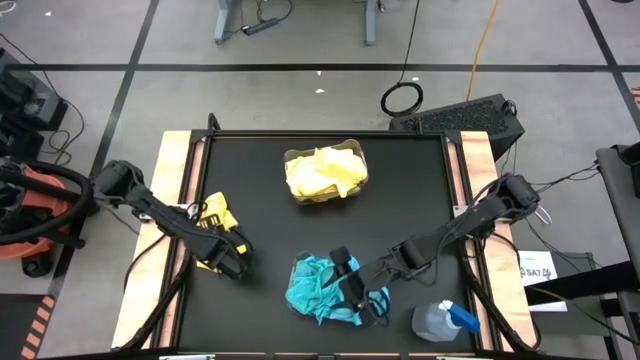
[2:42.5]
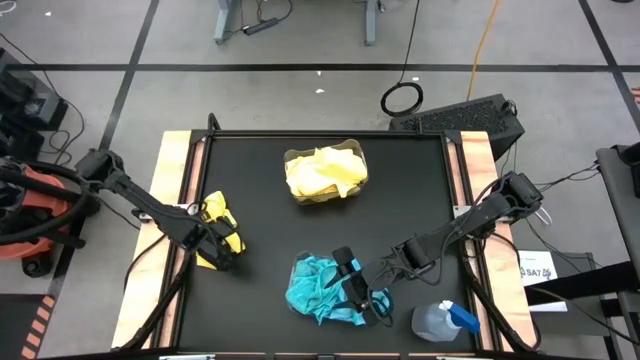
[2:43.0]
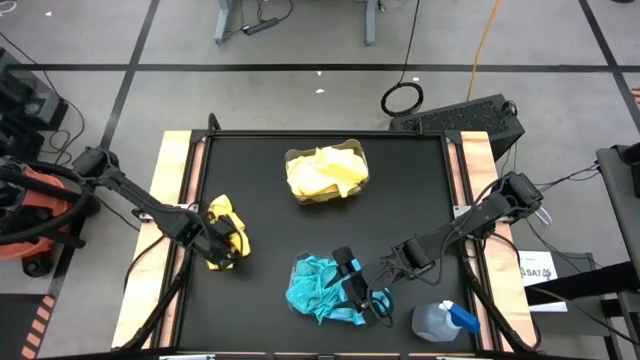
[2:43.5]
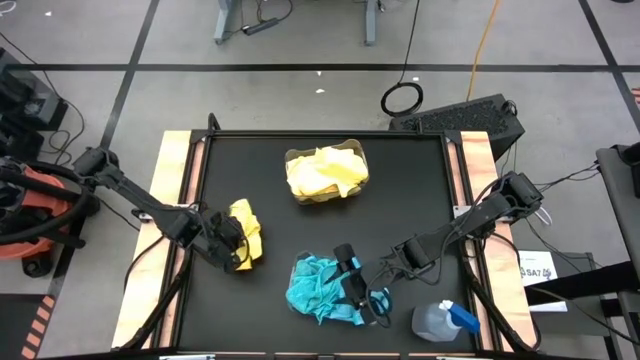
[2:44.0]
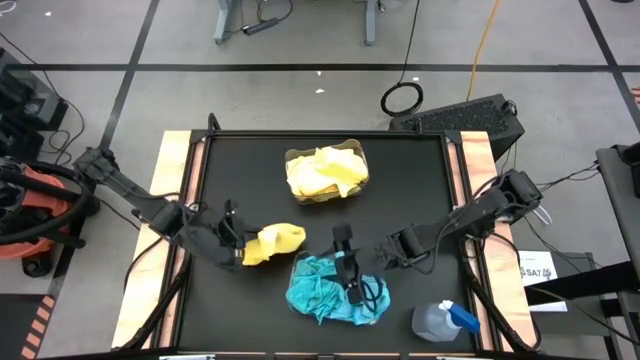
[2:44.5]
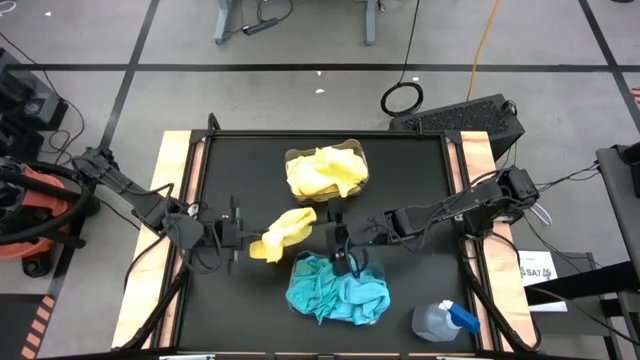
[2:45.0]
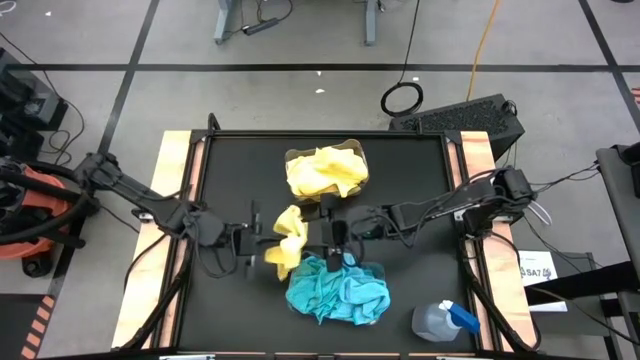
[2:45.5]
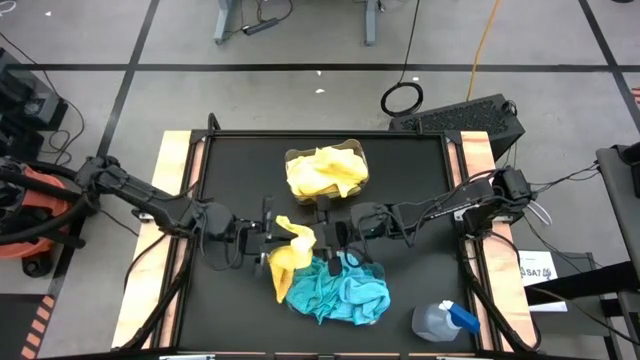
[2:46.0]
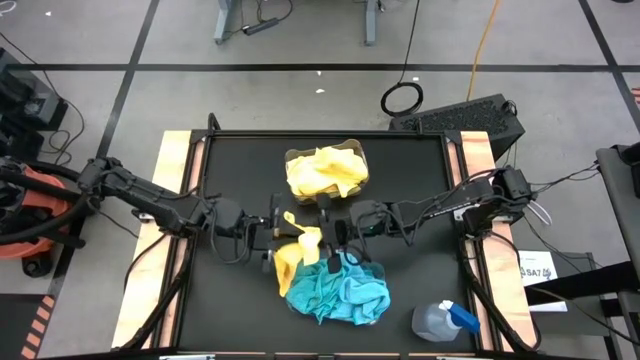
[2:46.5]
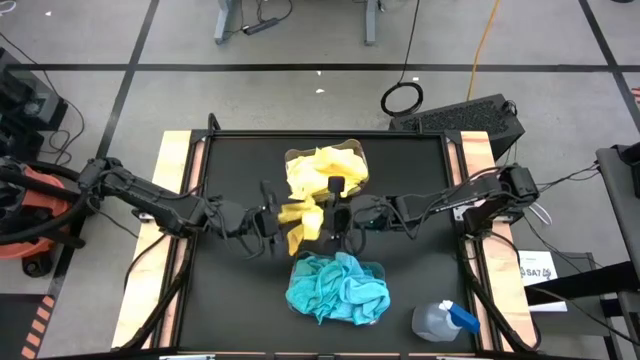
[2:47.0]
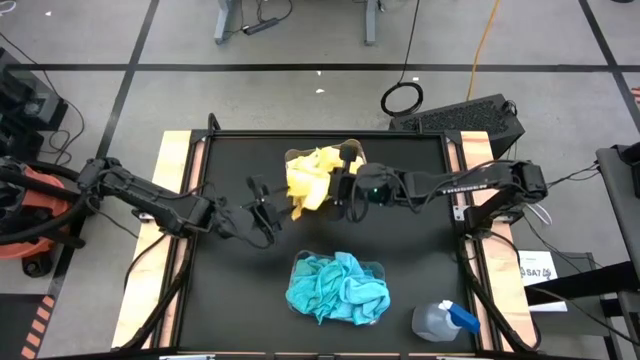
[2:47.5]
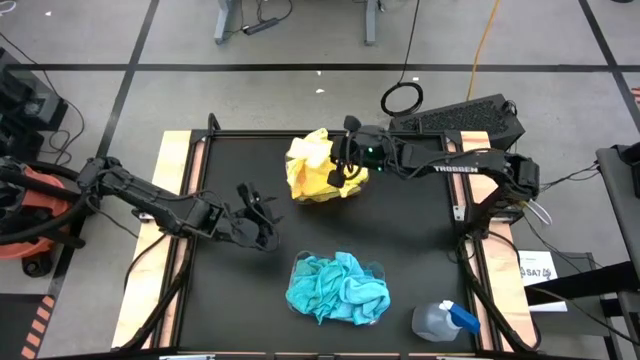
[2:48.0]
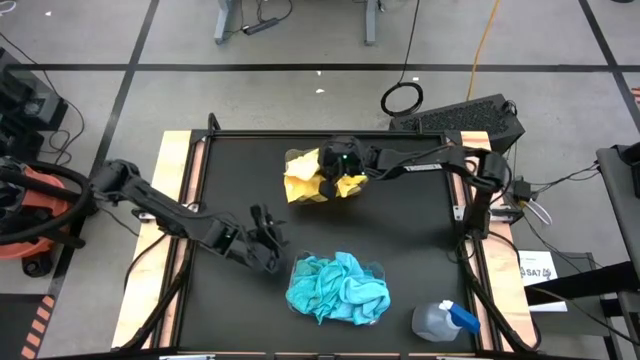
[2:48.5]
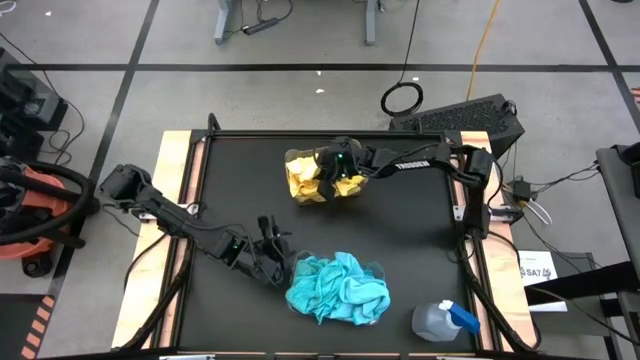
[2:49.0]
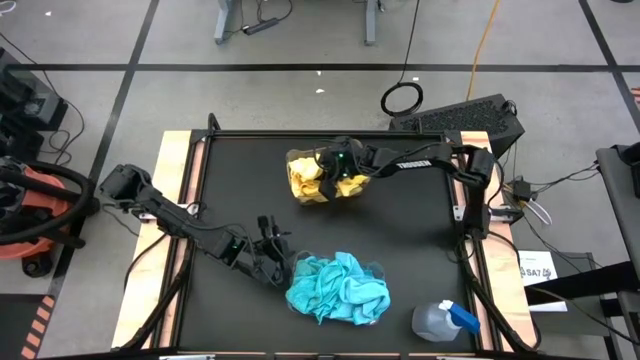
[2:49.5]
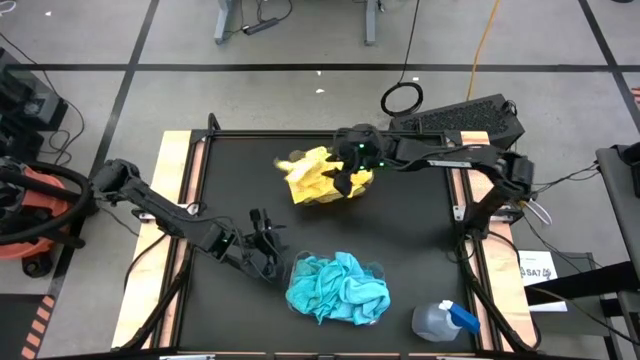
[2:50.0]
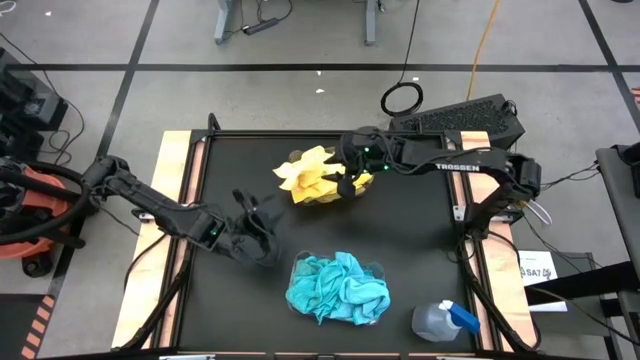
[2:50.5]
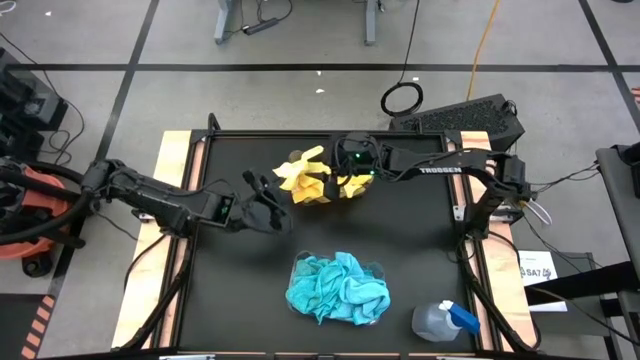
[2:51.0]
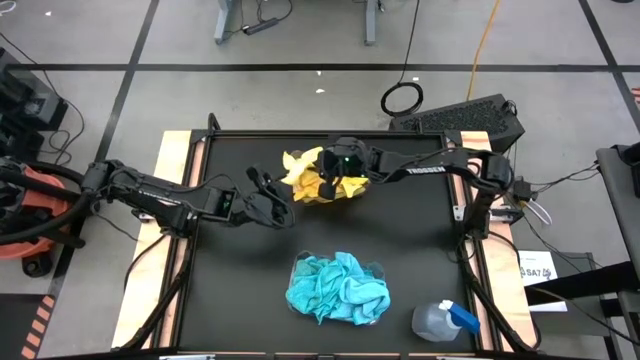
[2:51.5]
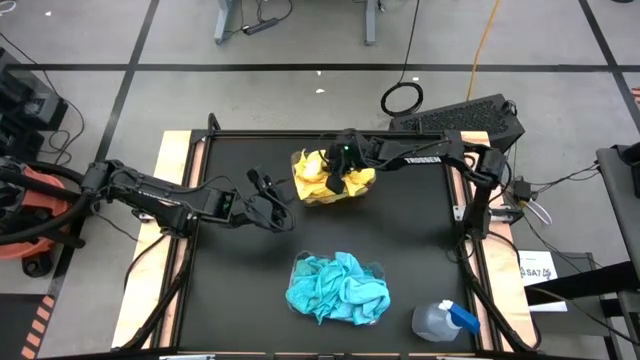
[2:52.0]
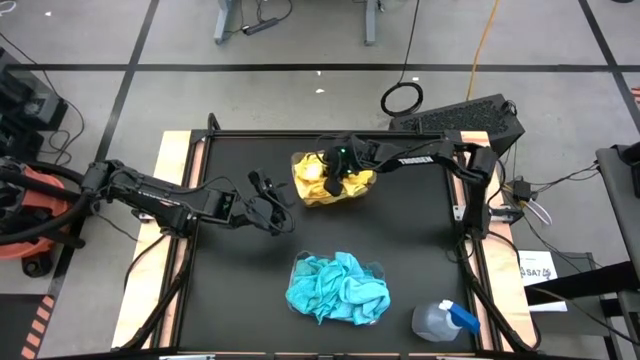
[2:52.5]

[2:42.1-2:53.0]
Task: Sort microfiber towel by color & place in baskets
Put the yellow towel into the top transparent bin

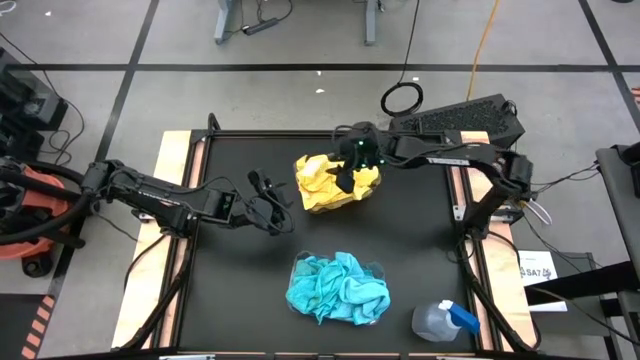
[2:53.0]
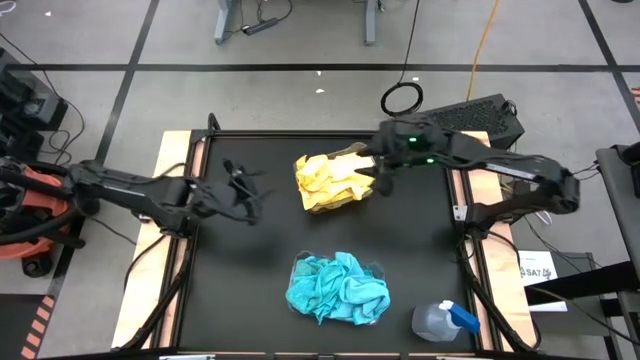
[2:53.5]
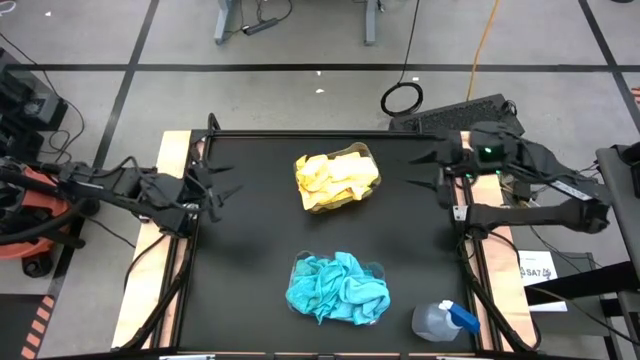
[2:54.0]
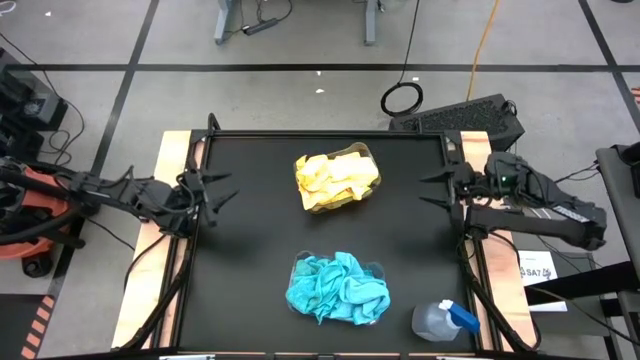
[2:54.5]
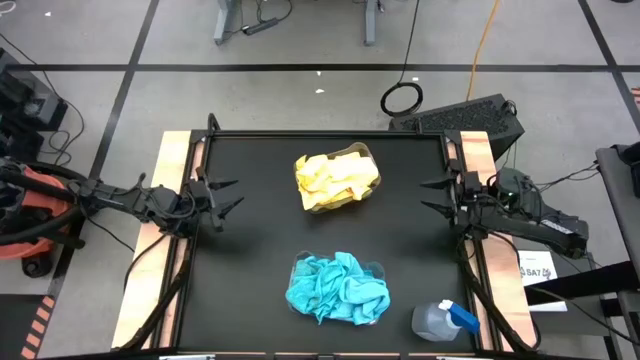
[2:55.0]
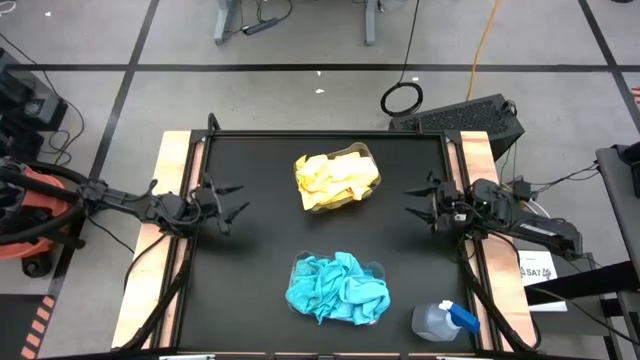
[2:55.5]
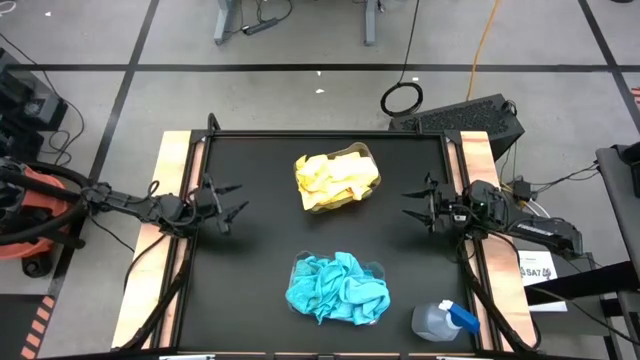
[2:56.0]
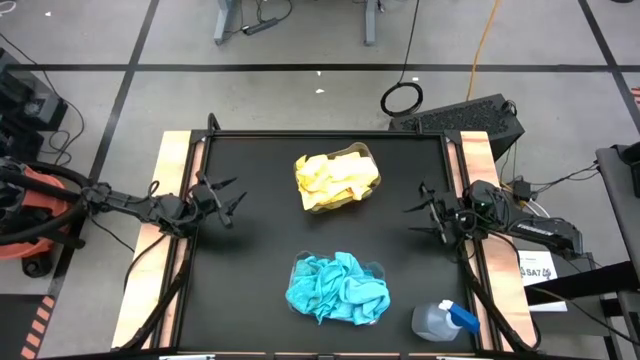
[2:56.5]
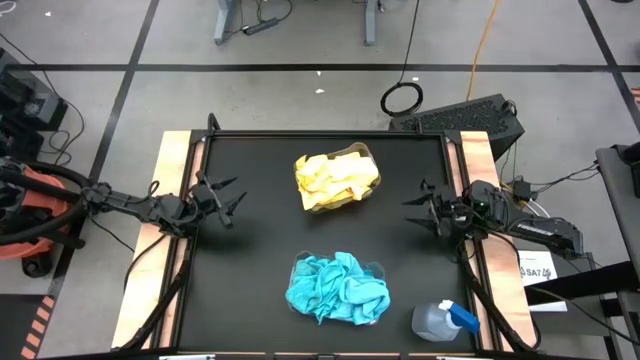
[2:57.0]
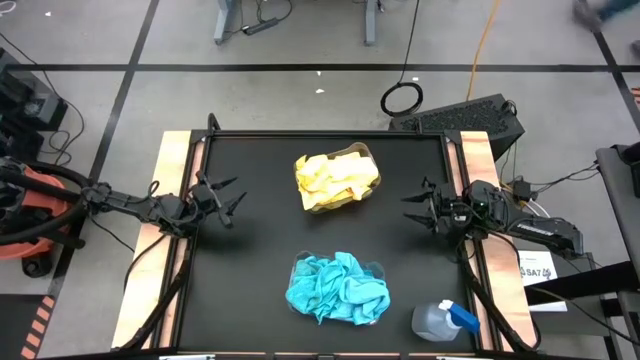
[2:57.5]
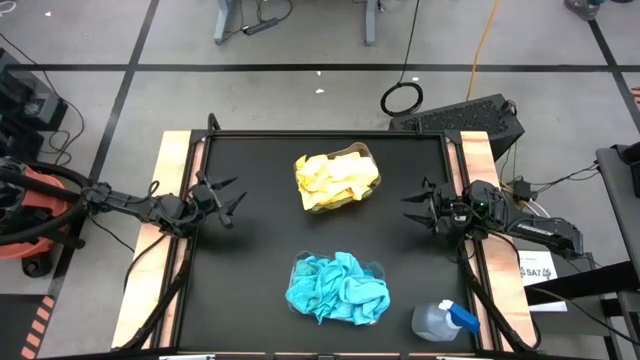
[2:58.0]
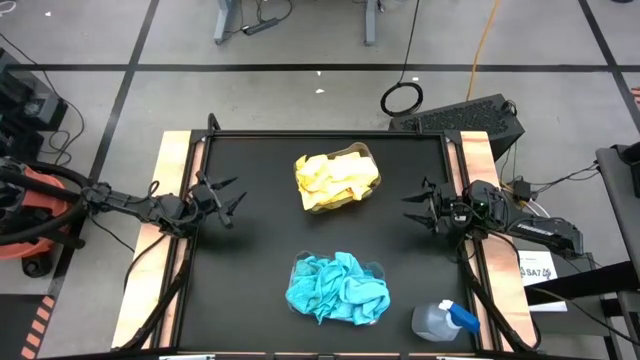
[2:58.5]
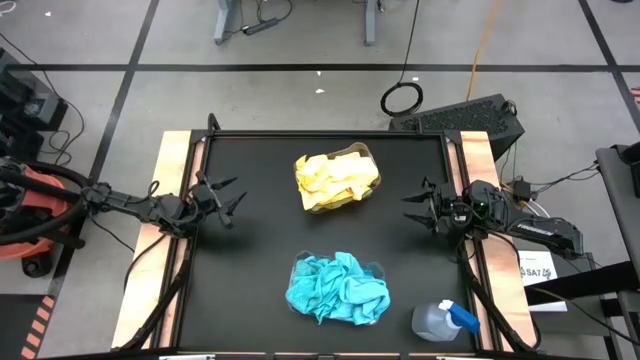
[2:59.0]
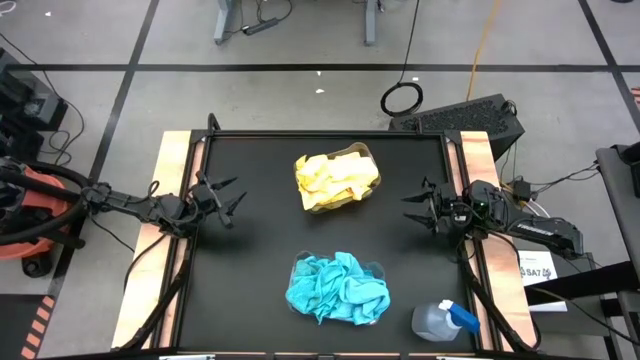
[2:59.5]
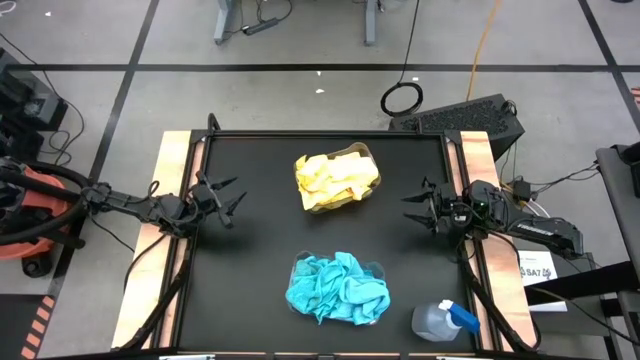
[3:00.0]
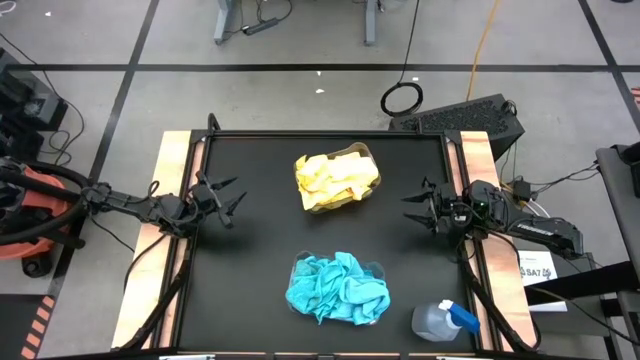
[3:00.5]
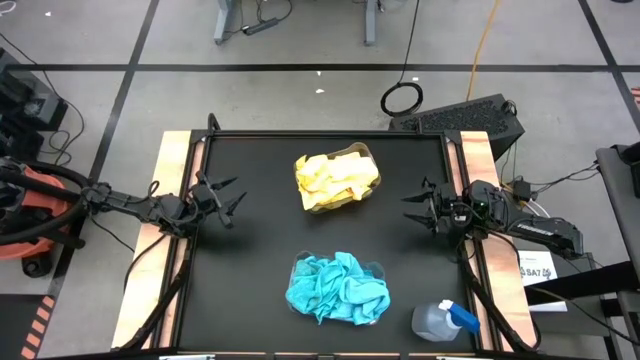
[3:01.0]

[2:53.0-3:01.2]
Return to Home Position
